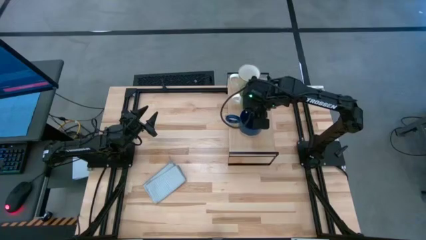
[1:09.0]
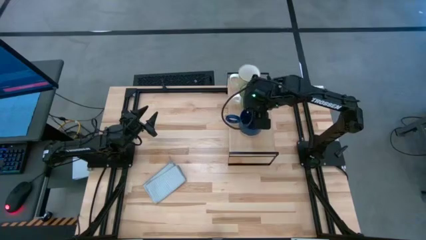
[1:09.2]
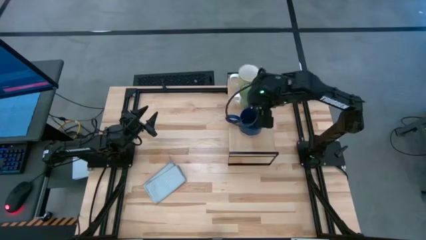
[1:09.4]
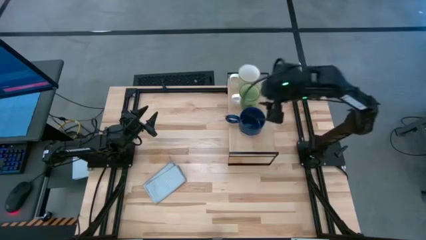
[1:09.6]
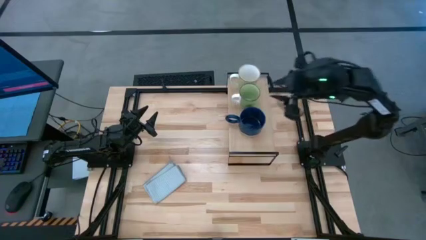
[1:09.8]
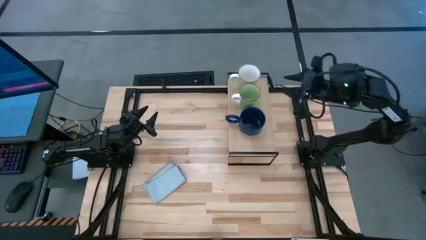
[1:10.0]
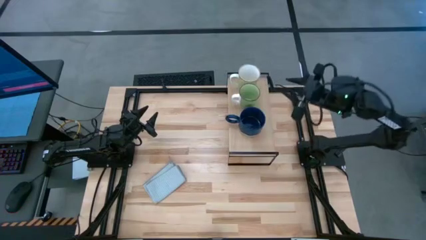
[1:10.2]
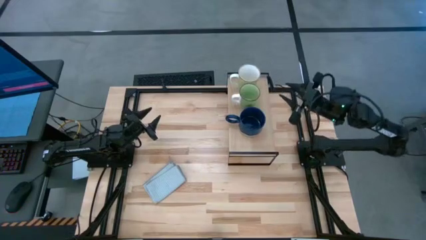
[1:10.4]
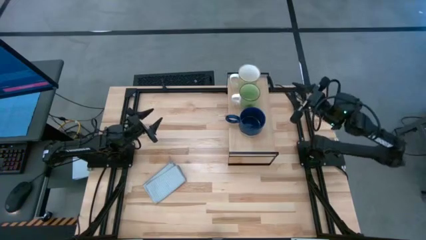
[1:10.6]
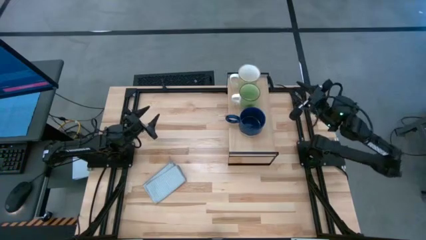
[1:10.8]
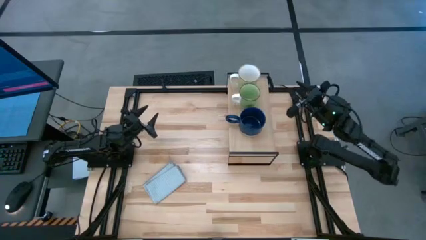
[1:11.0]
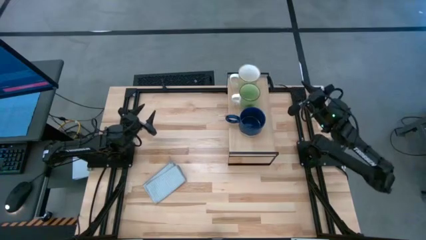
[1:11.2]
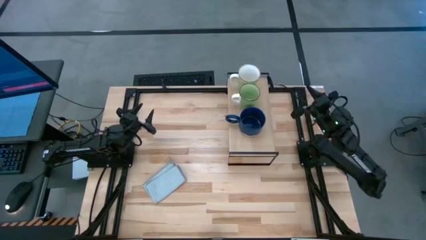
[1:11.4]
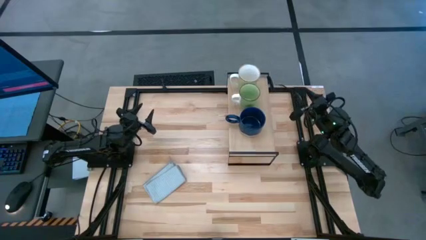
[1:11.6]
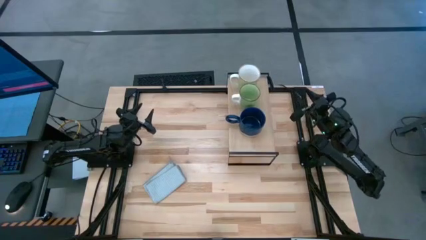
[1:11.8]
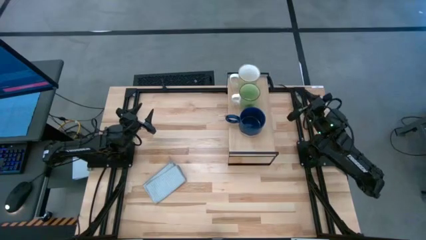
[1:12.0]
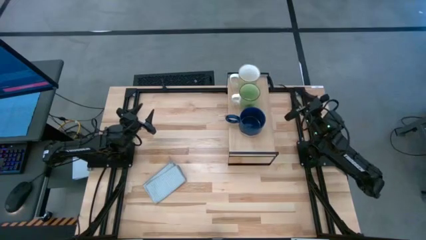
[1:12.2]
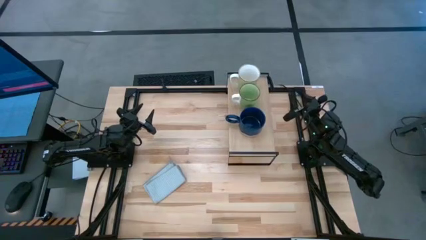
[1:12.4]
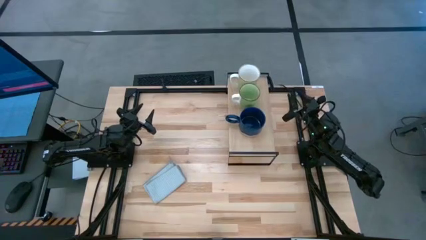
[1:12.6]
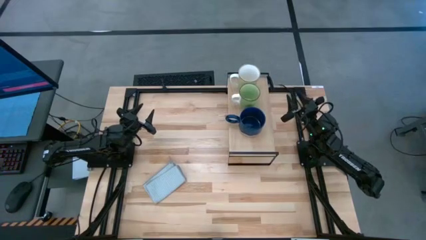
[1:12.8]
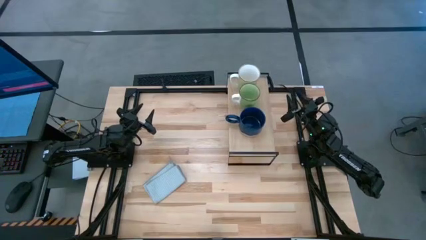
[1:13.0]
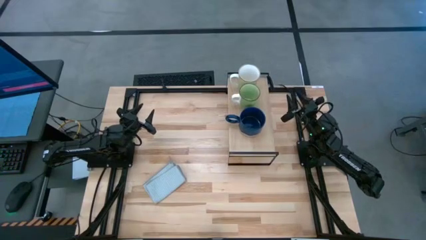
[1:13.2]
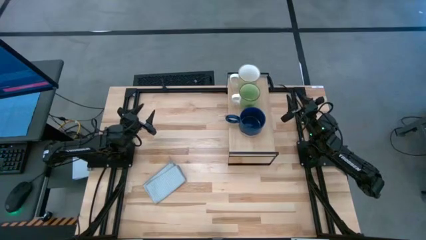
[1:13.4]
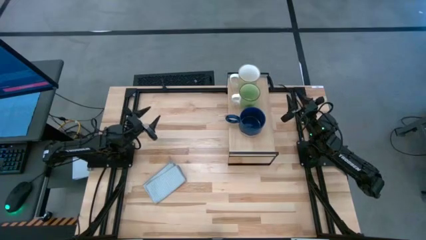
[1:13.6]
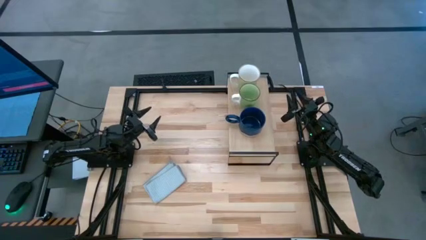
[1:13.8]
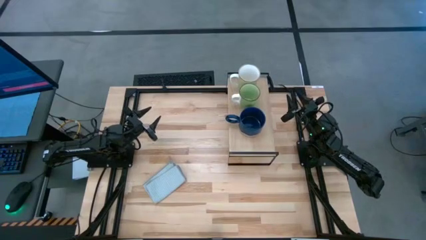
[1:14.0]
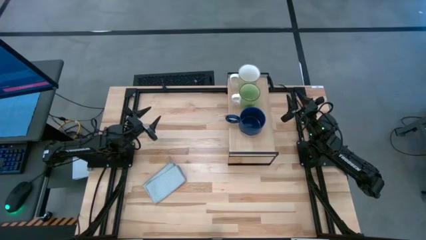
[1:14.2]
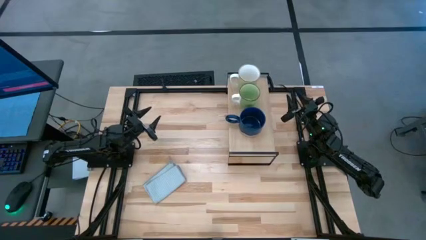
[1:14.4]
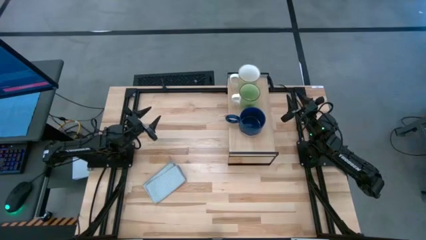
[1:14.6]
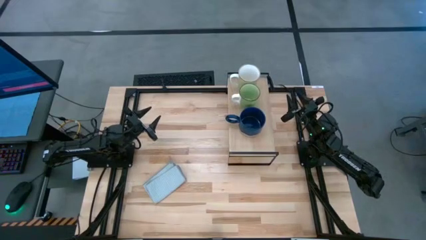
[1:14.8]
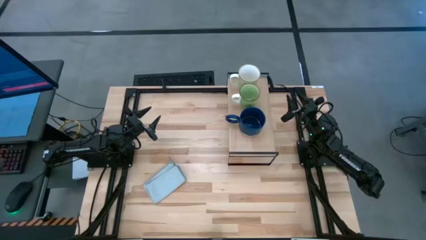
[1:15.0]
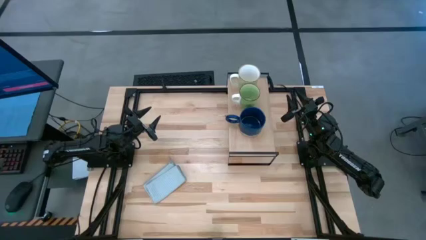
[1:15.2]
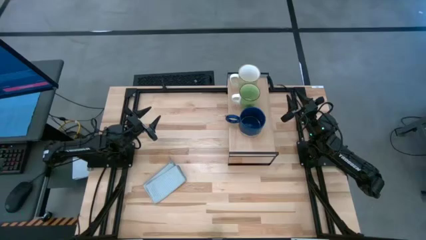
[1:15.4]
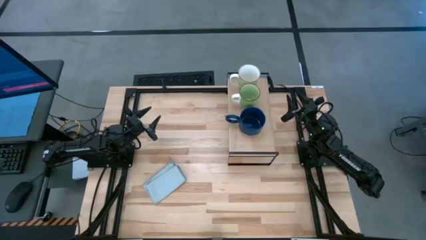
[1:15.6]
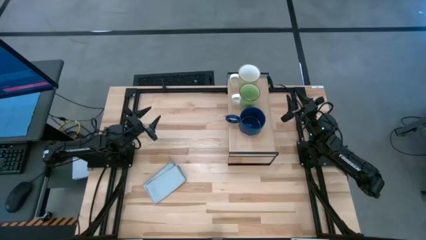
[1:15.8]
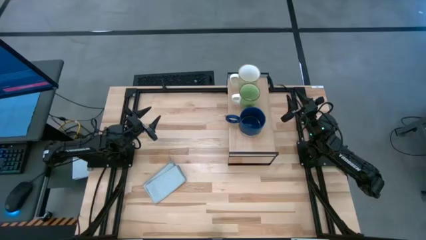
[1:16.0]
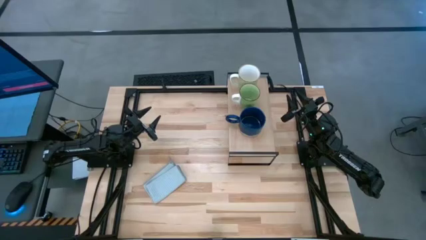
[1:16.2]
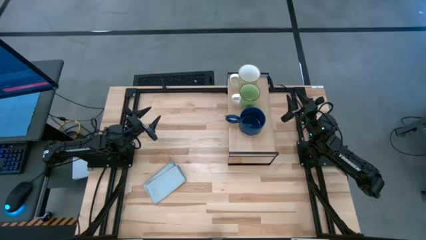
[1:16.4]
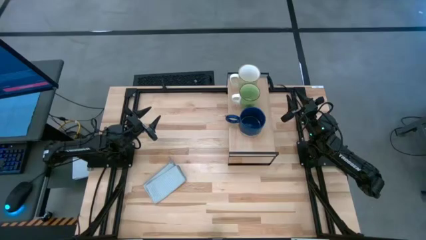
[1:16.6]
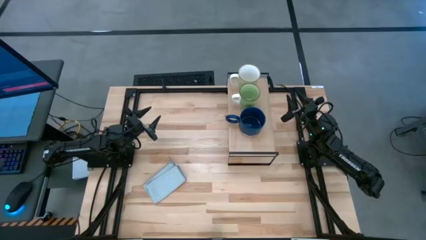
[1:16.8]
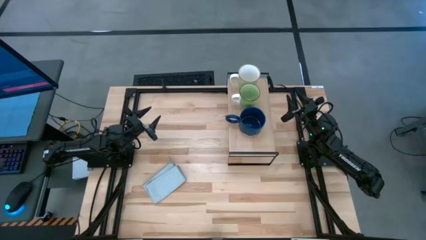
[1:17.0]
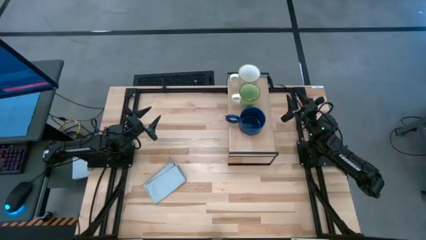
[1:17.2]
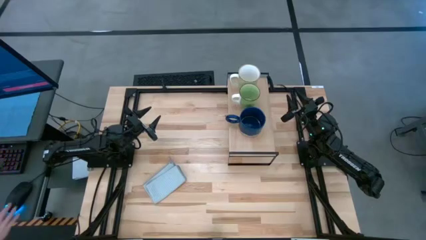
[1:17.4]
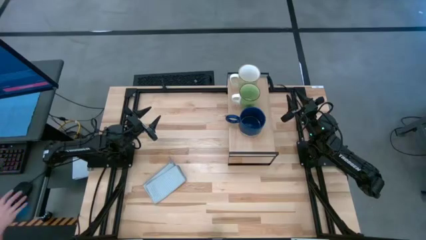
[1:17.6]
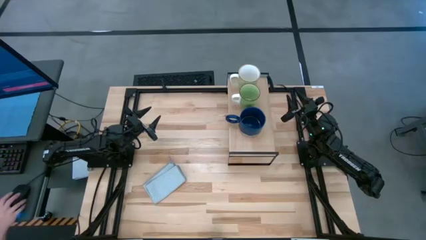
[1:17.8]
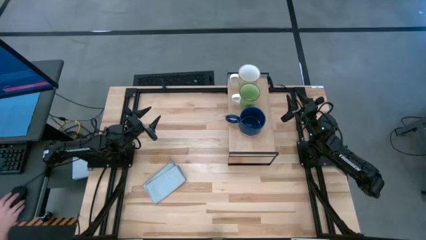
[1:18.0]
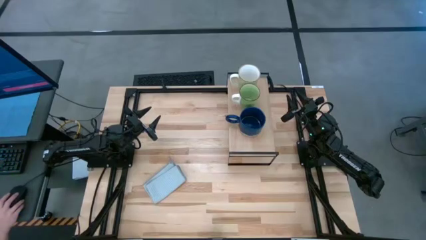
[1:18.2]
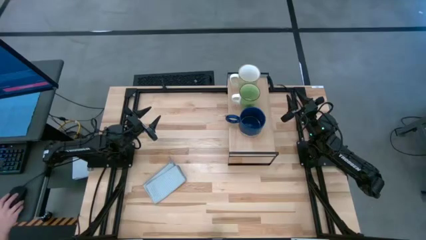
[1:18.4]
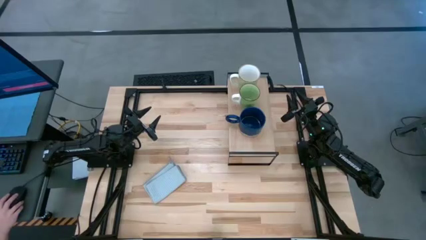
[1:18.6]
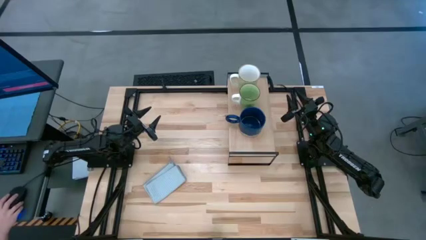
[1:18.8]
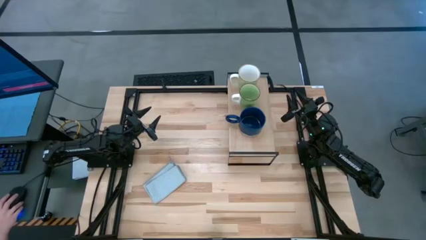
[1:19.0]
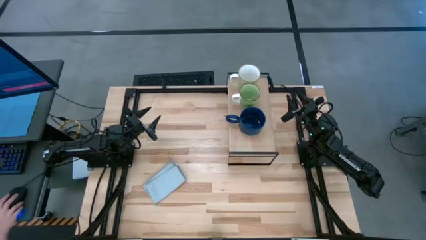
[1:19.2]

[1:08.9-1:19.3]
Task: Stack small to large cups/mugs on shelf
Return to Home Position

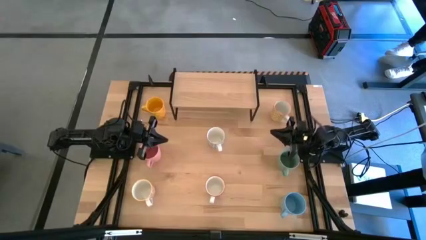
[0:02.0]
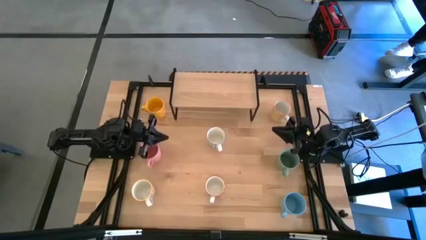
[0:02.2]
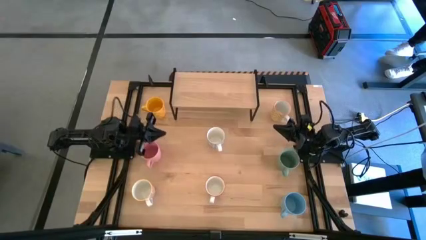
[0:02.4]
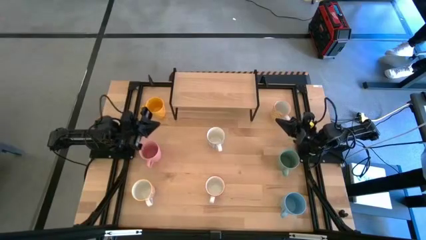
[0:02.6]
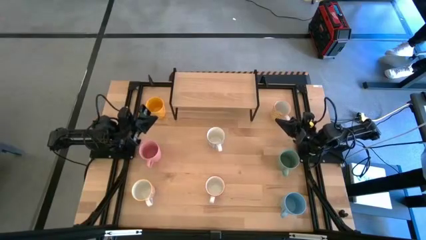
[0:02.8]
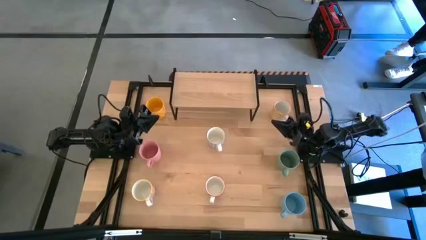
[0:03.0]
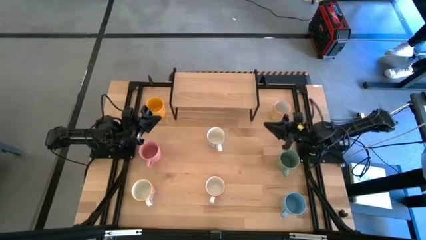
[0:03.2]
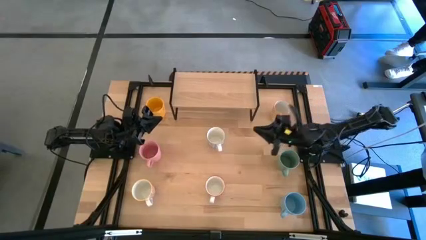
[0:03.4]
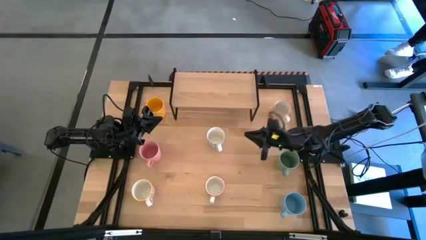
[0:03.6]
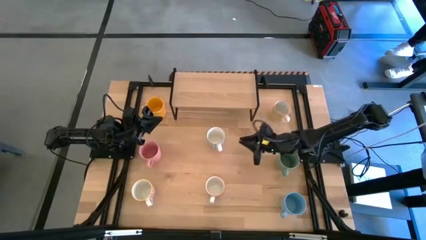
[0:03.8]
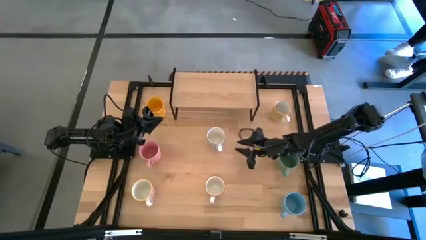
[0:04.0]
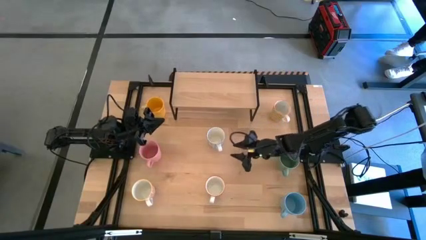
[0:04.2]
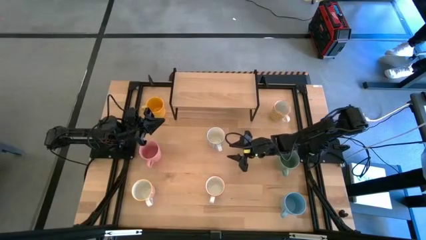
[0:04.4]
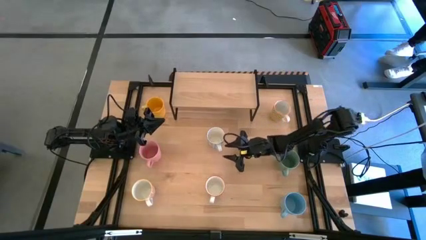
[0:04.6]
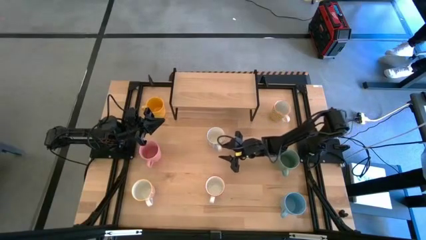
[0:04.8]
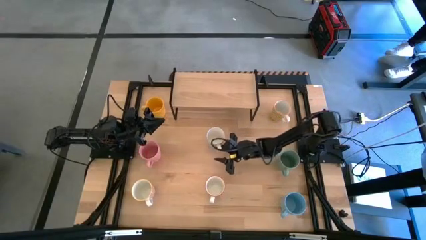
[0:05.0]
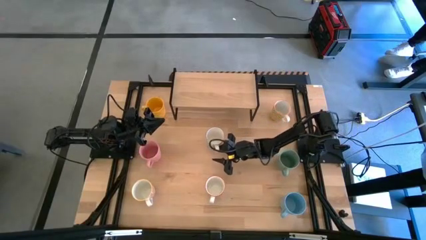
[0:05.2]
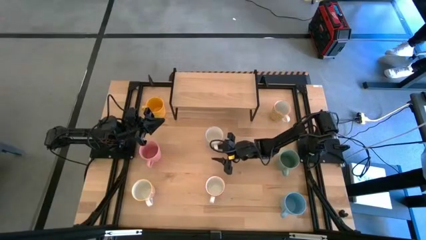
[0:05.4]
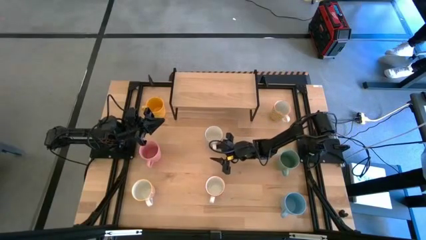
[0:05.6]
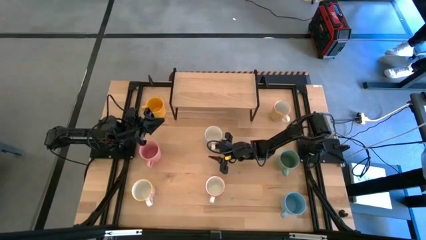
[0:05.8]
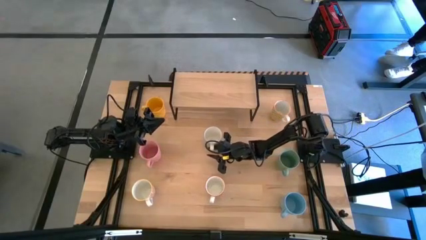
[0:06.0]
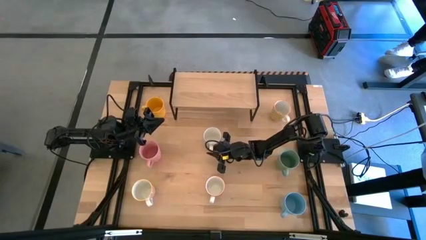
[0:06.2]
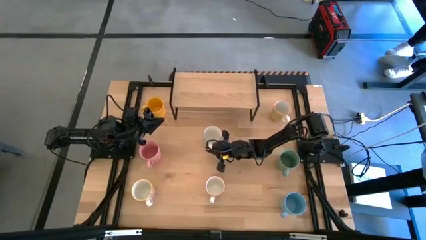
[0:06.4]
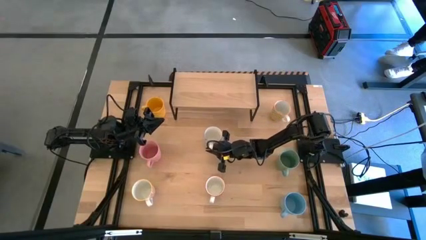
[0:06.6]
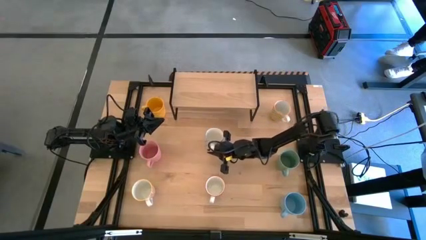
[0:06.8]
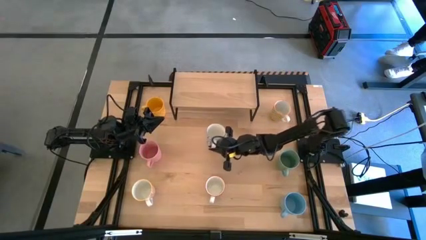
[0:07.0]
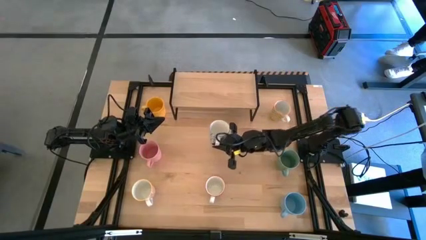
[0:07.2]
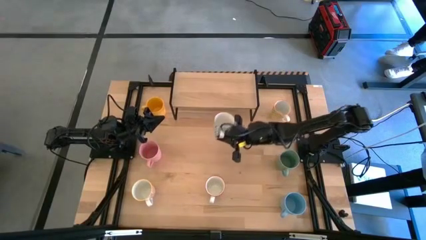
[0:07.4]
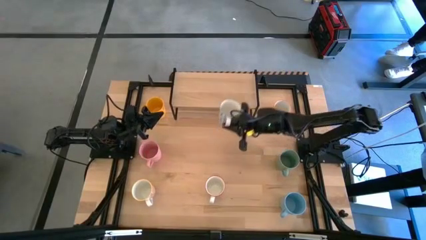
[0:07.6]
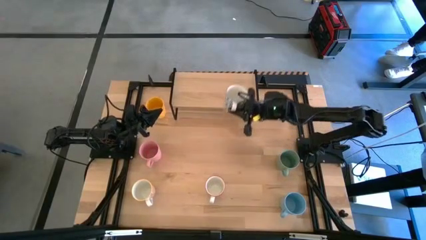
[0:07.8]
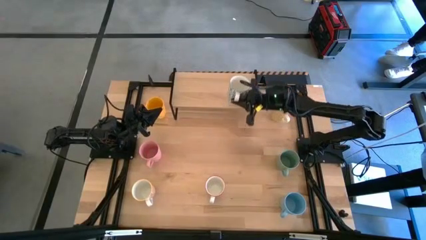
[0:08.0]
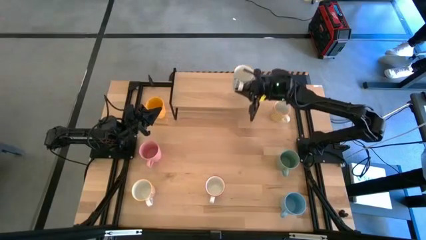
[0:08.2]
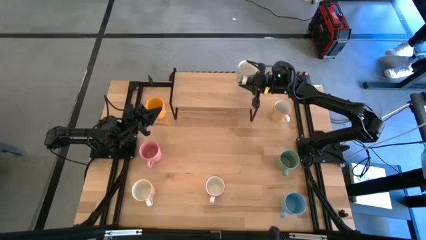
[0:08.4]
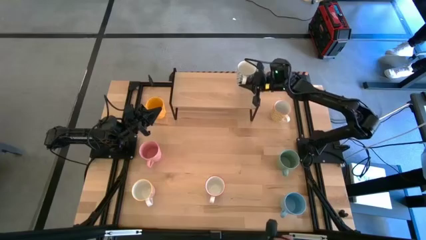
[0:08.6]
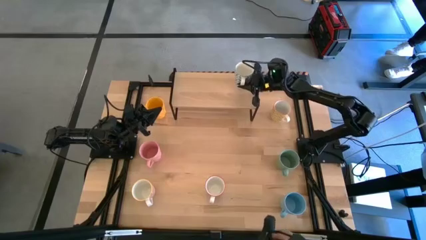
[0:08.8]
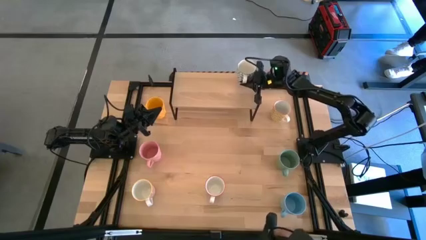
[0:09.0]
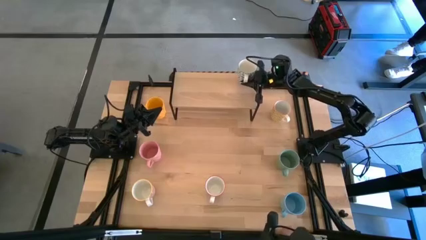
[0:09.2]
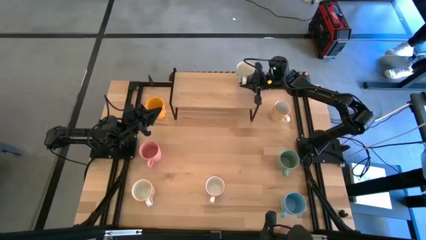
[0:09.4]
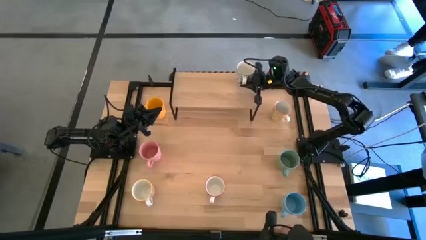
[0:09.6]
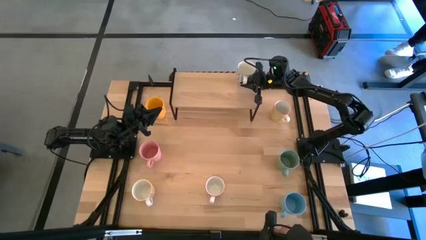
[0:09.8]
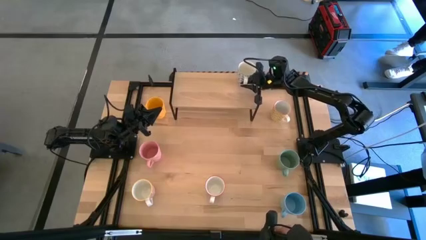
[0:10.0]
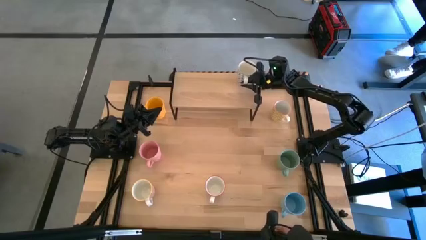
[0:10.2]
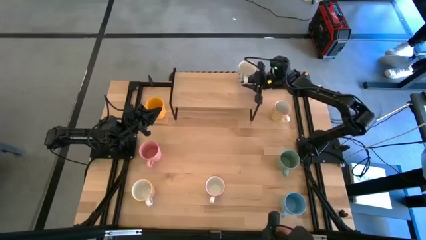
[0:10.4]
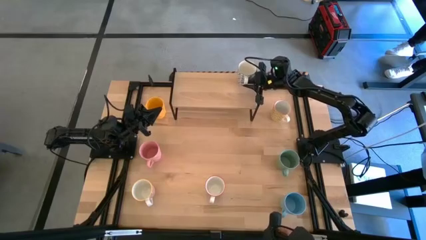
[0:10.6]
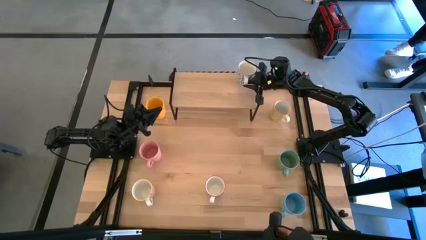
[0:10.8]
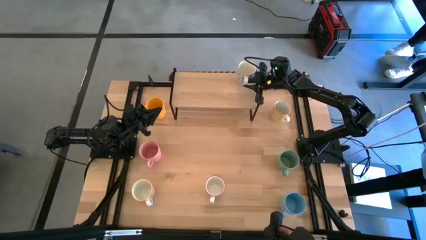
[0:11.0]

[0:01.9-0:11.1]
Task: Place coffee mugs
Put the blue patterned mug on the shelf
